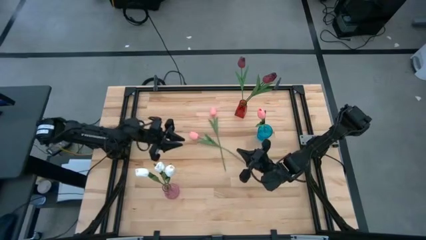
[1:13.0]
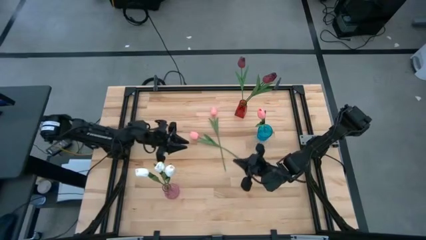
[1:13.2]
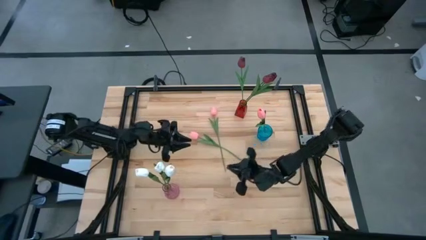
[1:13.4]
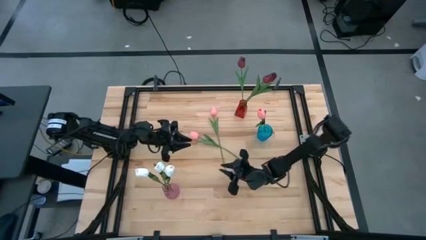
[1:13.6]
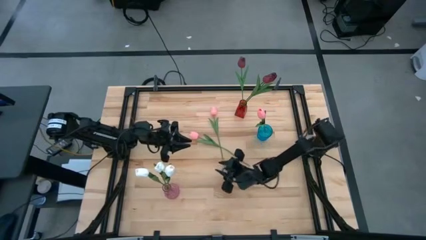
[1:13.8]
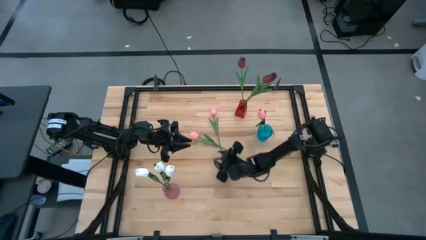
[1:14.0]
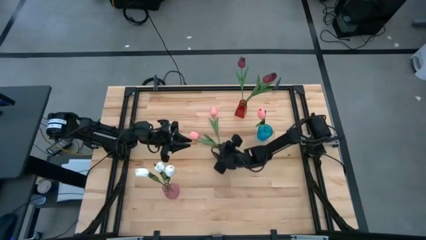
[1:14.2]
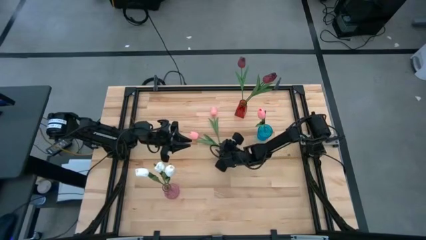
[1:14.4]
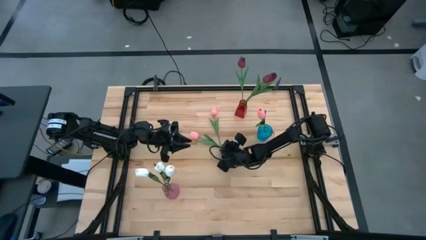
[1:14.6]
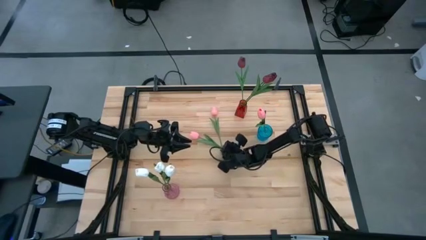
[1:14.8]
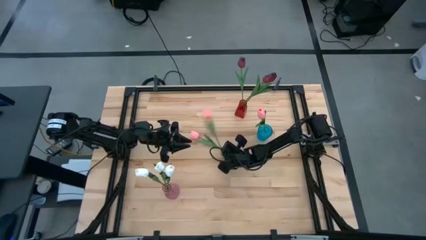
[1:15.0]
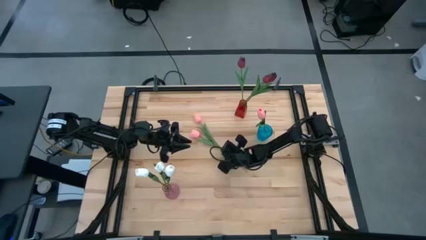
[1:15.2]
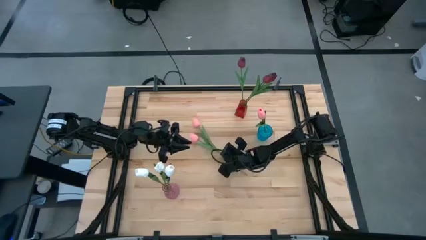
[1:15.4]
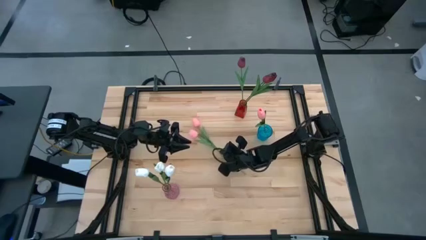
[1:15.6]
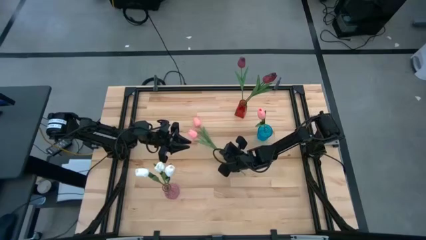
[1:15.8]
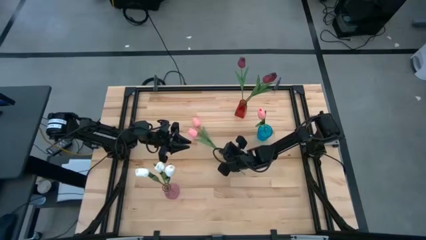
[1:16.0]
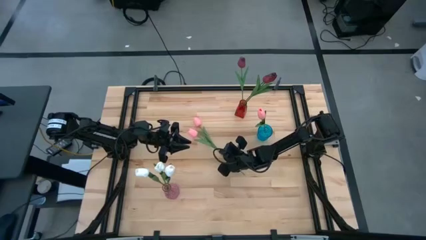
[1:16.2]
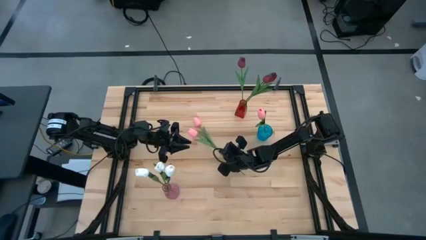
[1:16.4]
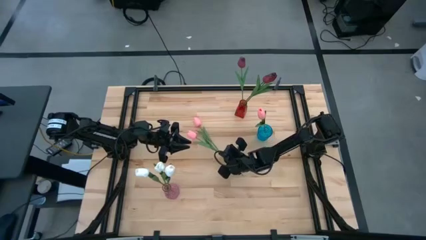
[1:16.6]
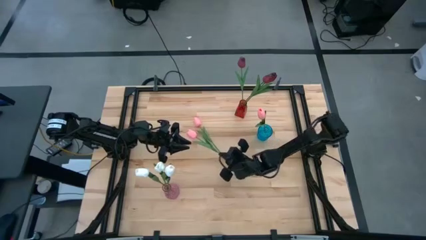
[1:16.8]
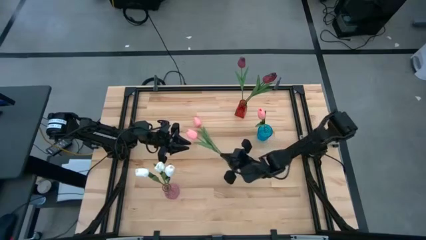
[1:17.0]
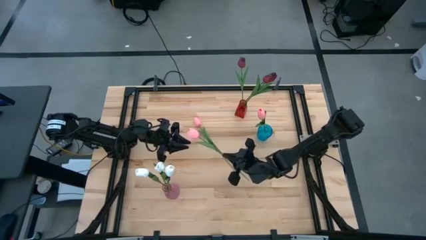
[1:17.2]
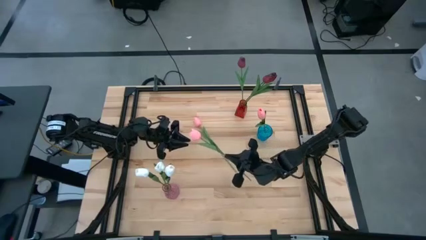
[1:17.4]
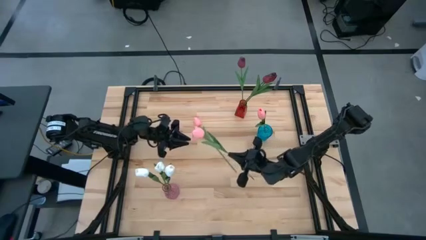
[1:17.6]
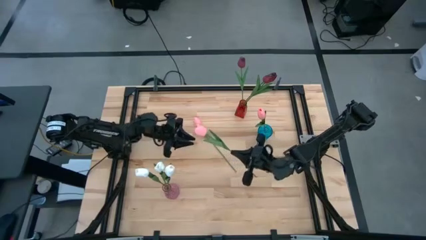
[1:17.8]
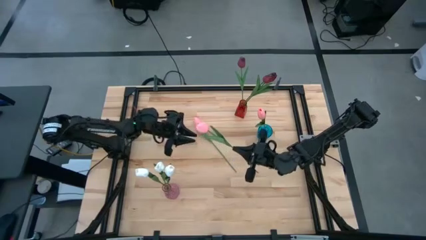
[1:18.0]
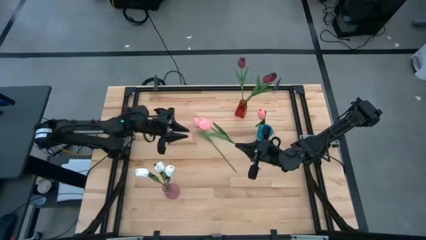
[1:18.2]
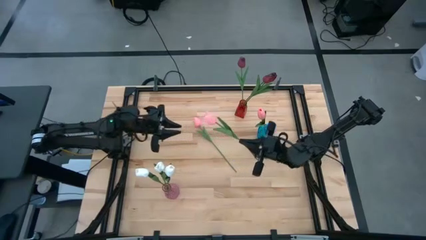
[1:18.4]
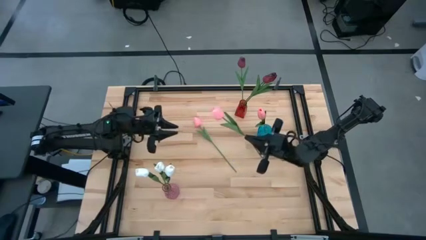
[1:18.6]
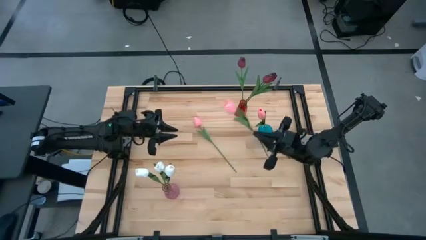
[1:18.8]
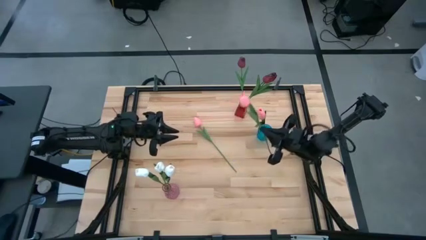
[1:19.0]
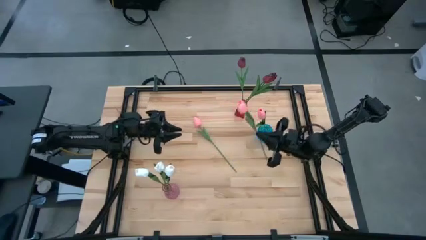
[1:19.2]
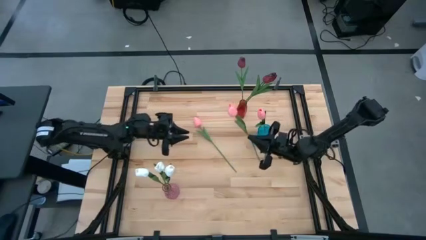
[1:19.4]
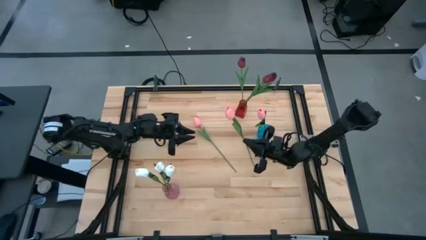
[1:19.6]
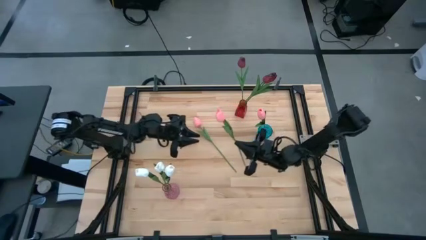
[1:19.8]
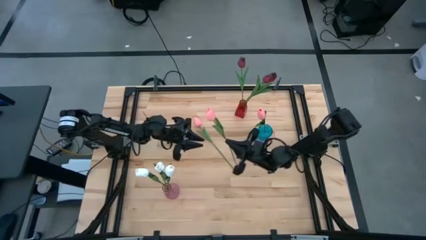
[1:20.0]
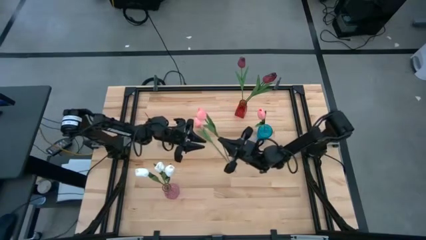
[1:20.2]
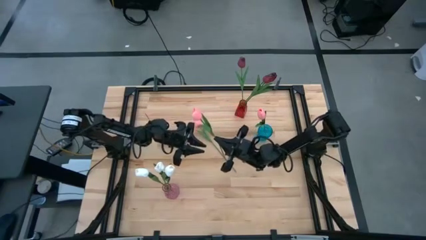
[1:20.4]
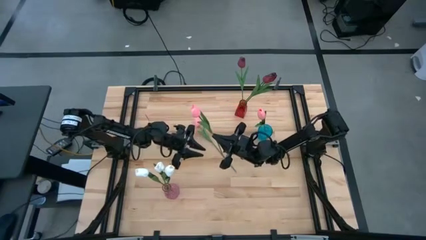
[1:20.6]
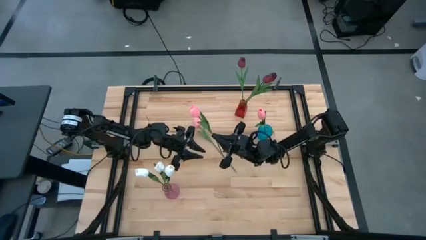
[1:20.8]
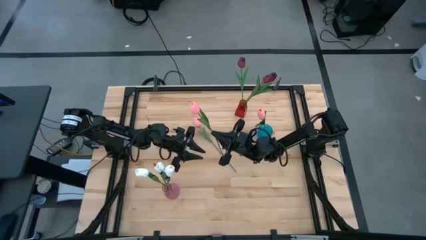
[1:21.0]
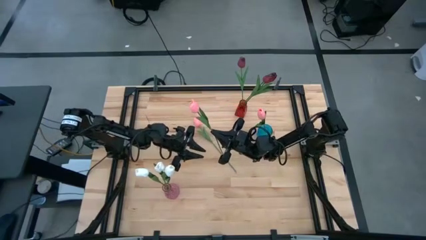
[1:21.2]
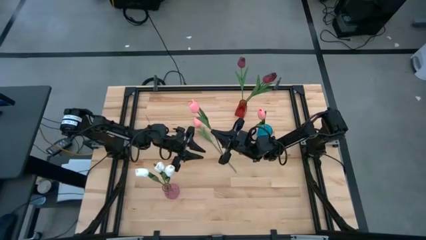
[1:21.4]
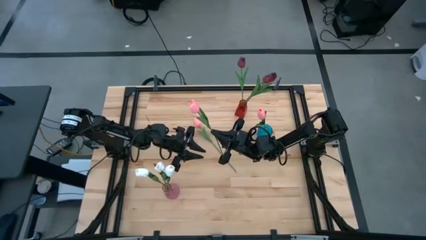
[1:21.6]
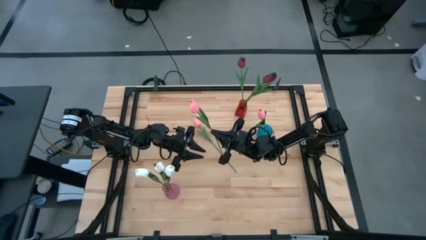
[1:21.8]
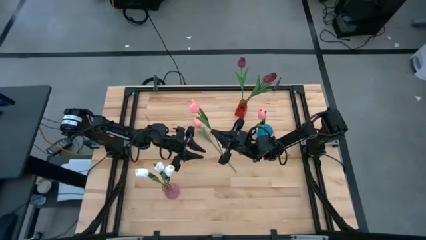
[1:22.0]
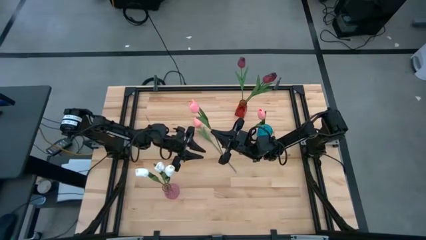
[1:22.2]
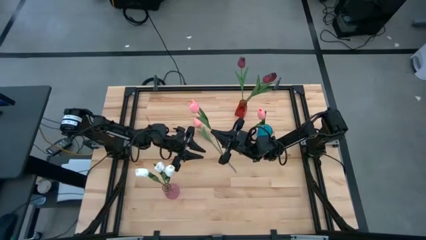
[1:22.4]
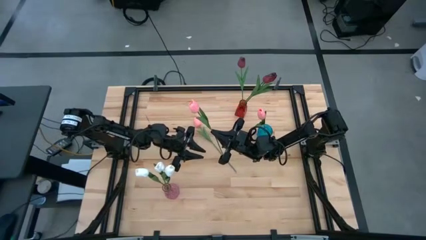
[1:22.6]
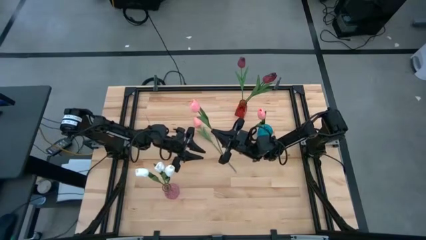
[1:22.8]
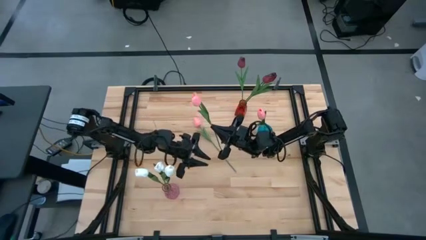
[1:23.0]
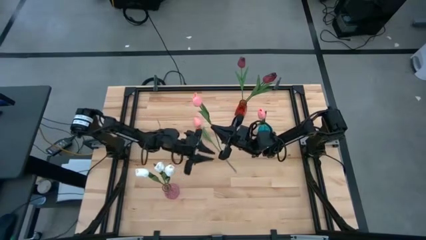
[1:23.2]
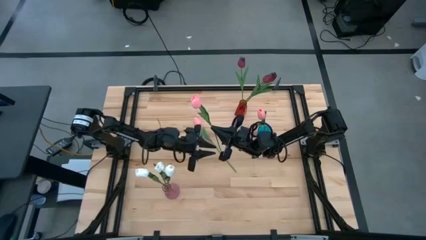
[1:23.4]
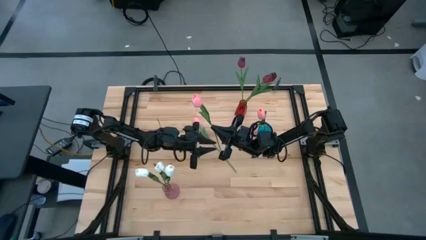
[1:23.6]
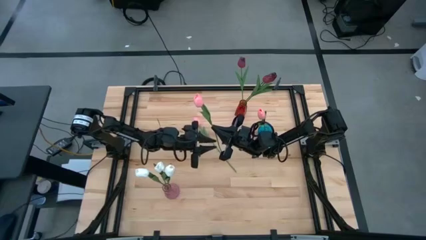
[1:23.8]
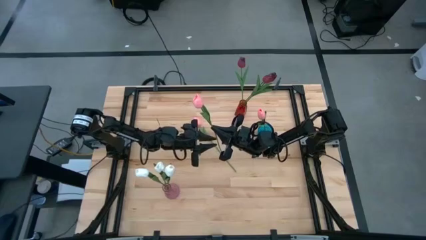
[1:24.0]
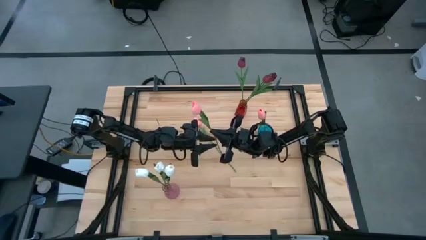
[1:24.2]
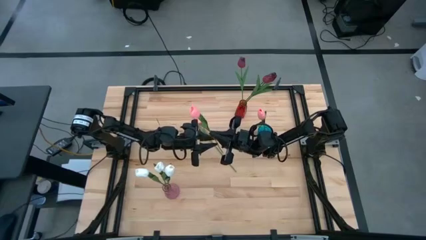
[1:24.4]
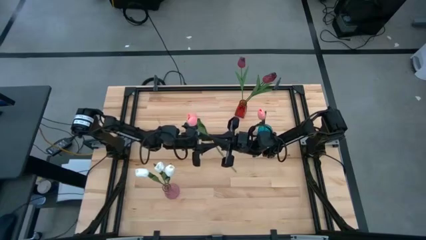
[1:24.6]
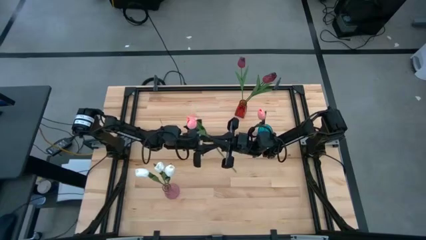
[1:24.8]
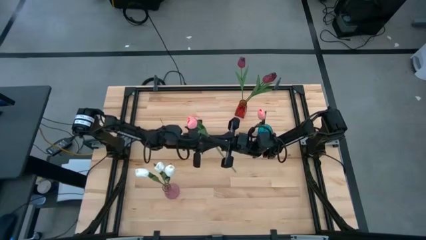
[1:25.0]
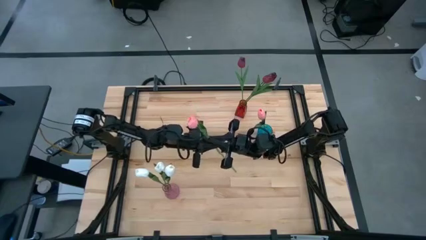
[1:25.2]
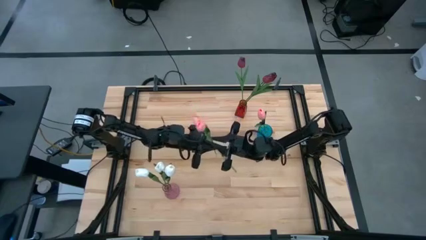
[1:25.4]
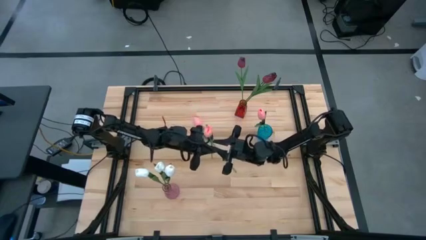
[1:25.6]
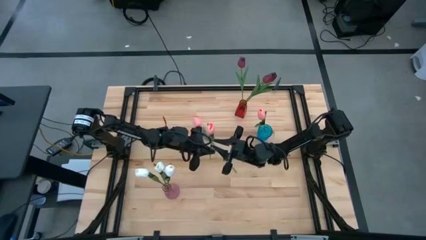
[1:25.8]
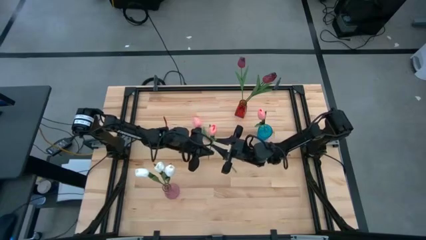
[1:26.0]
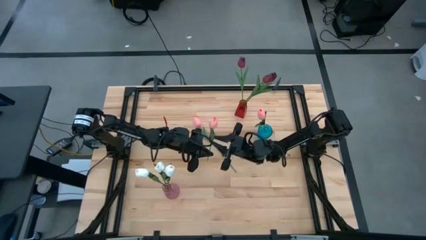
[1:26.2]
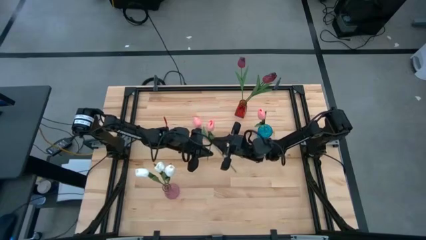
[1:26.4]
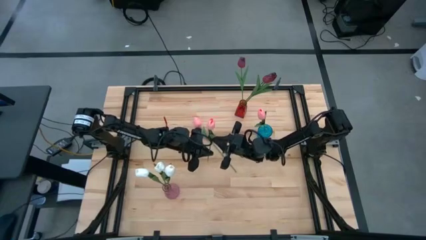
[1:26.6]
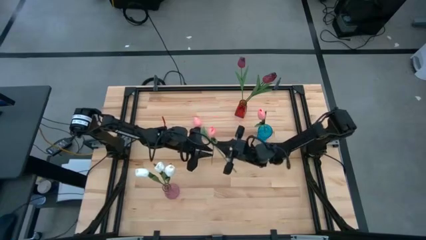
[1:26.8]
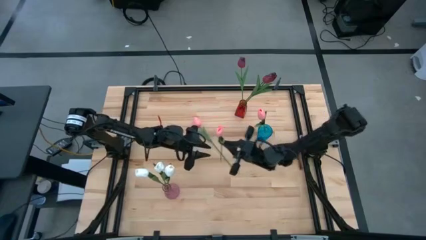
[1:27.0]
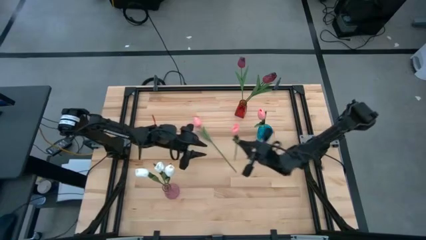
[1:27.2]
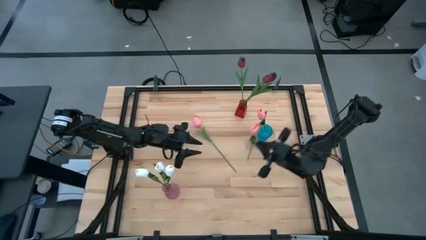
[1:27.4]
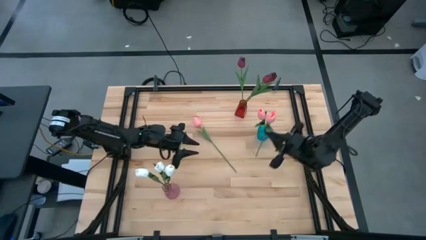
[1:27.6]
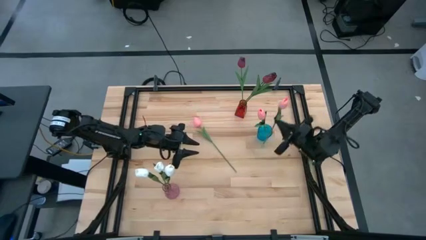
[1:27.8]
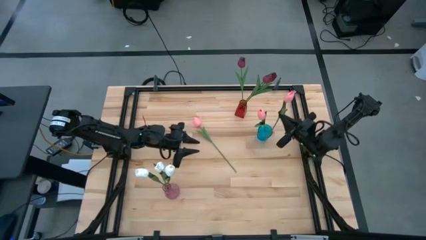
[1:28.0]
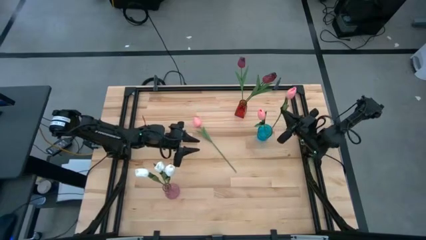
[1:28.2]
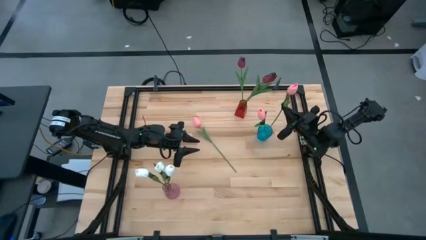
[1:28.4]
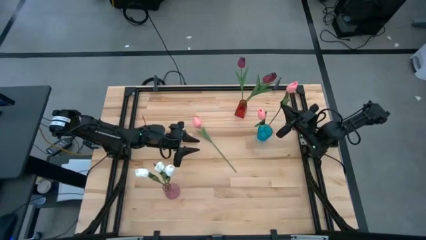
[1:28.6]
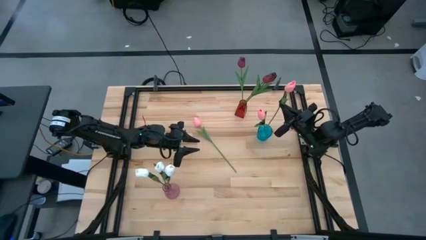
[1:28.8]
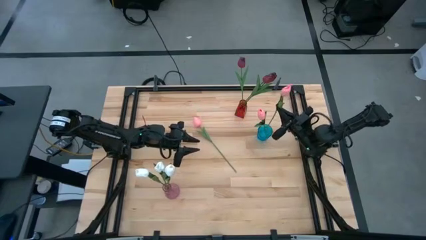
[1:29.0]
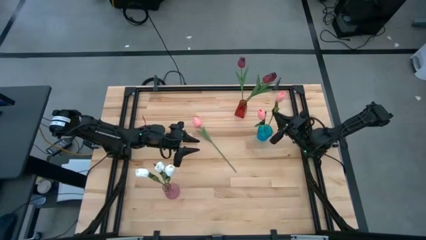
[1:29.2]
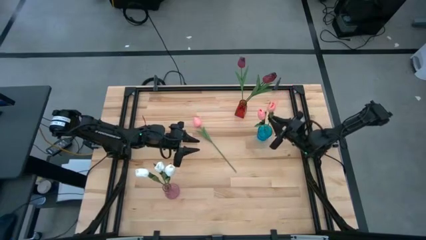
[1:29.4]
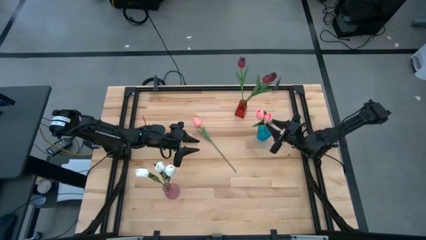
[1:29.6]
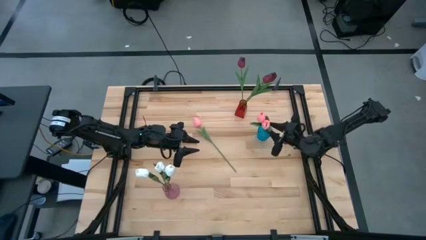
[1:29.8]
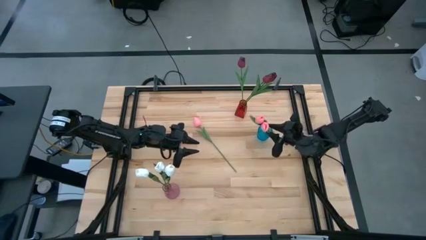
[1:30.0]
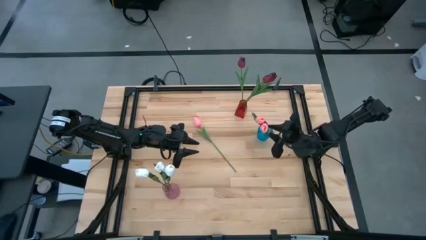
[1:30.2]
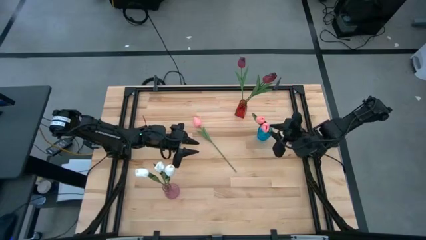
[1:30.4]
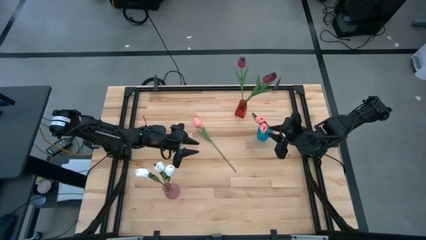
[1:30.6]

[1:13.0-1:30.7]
Task: Sort flowers into vase by color
Put the left pink tulip into the blue vase
